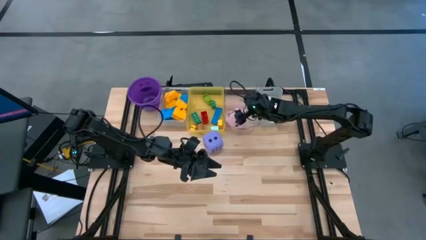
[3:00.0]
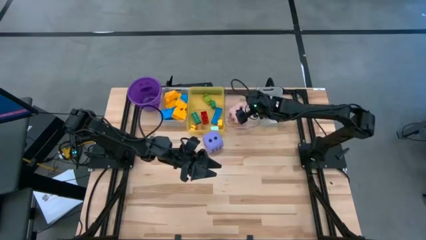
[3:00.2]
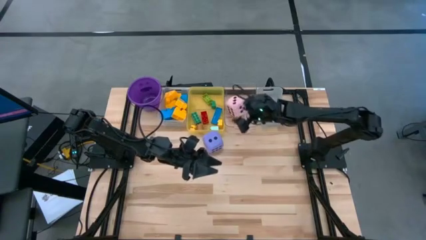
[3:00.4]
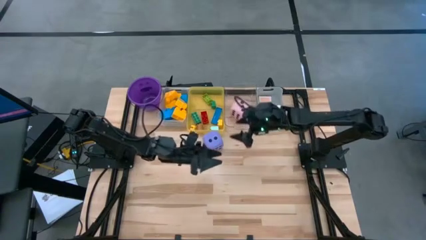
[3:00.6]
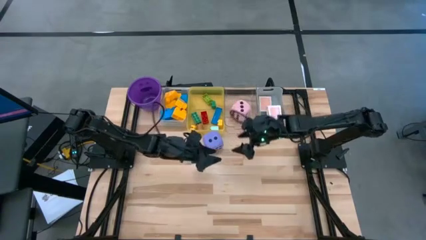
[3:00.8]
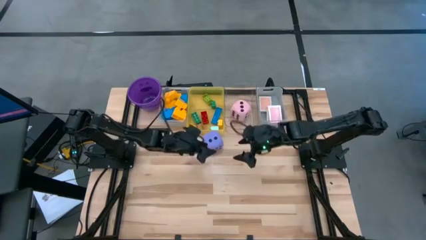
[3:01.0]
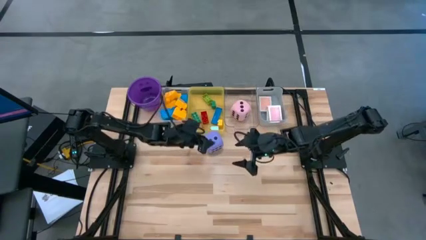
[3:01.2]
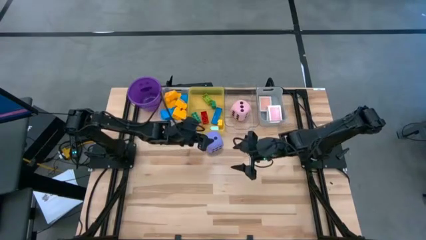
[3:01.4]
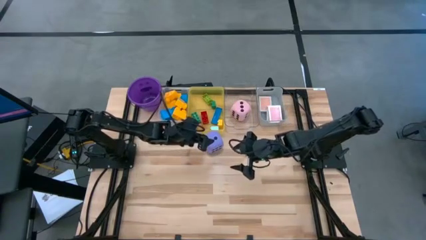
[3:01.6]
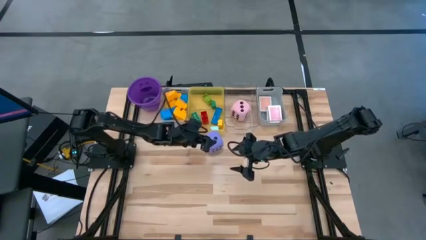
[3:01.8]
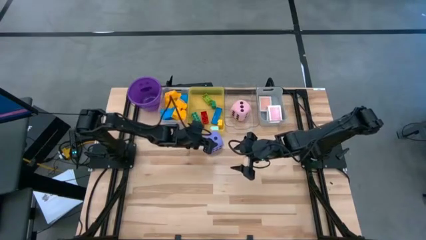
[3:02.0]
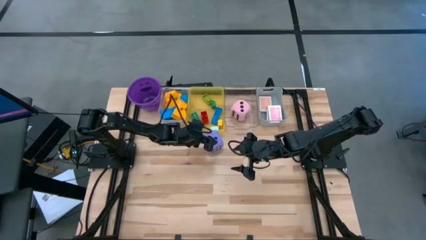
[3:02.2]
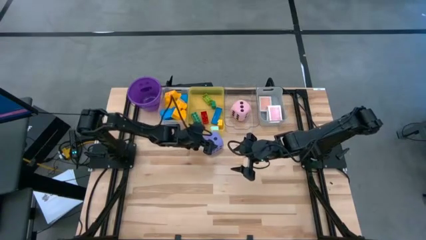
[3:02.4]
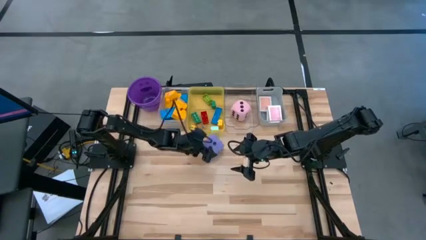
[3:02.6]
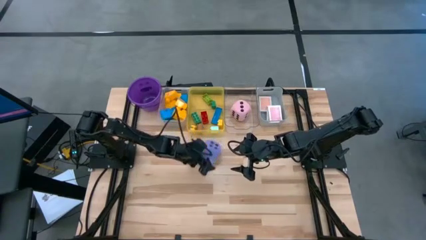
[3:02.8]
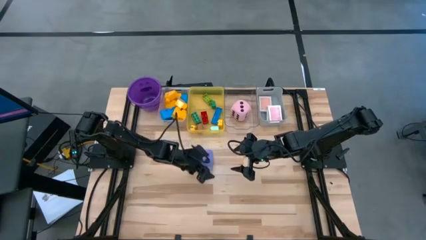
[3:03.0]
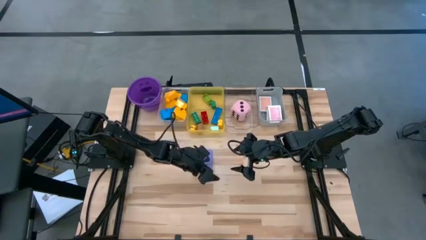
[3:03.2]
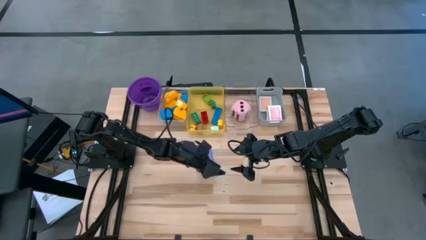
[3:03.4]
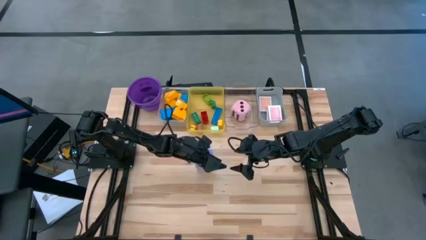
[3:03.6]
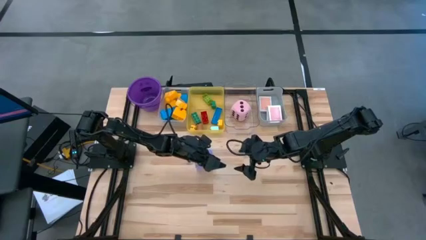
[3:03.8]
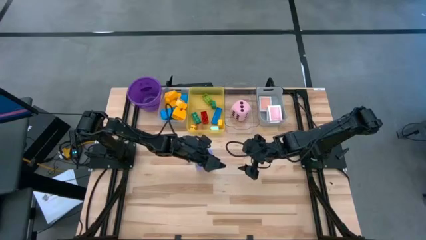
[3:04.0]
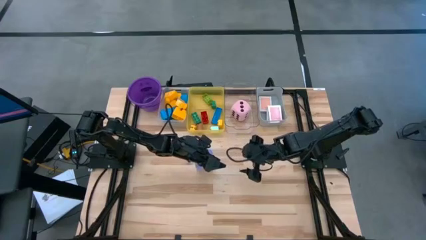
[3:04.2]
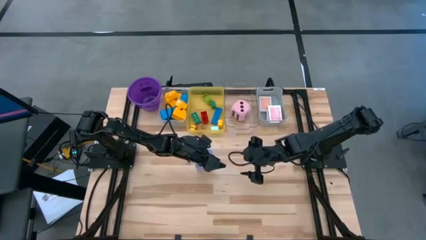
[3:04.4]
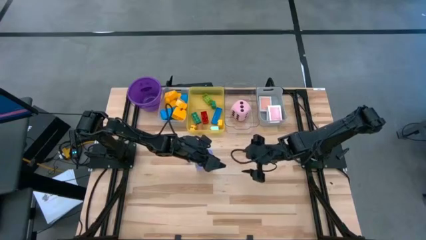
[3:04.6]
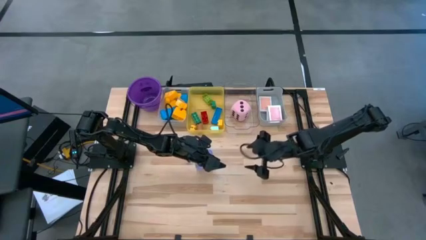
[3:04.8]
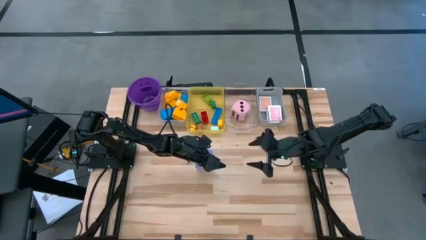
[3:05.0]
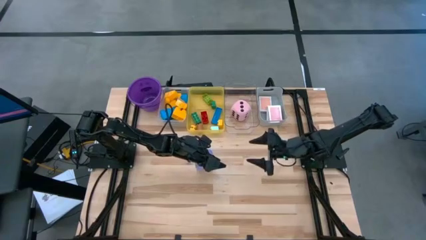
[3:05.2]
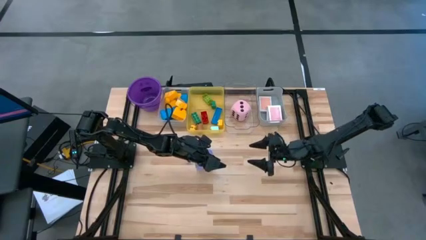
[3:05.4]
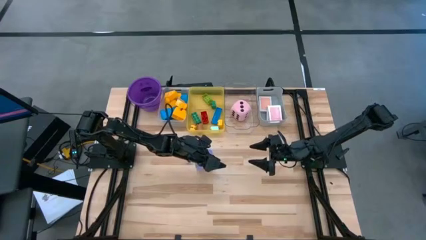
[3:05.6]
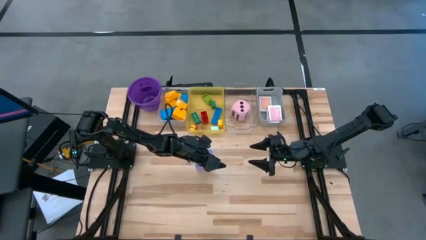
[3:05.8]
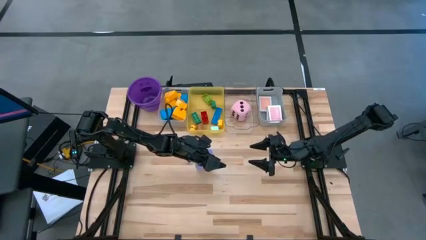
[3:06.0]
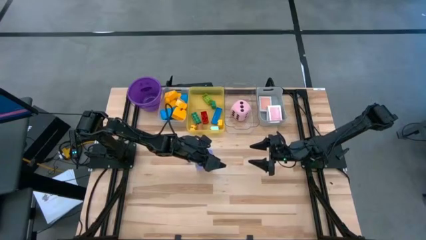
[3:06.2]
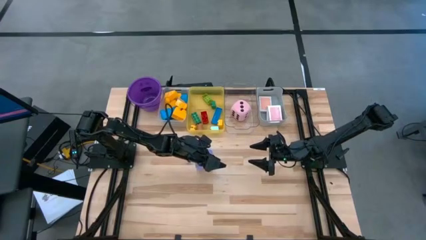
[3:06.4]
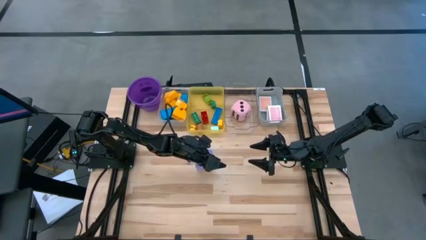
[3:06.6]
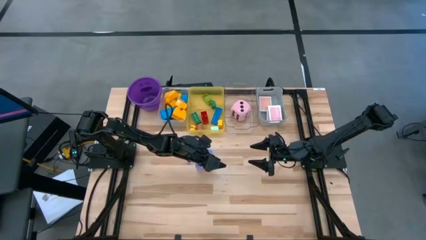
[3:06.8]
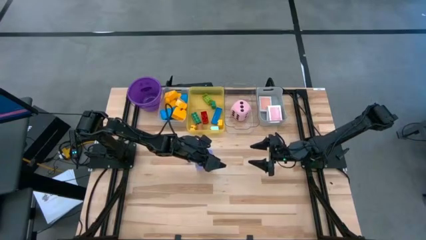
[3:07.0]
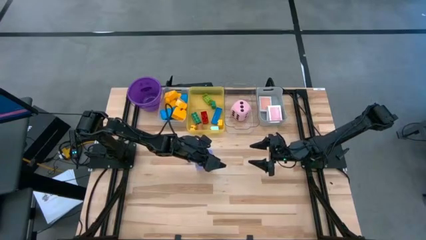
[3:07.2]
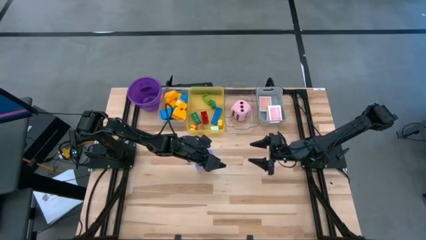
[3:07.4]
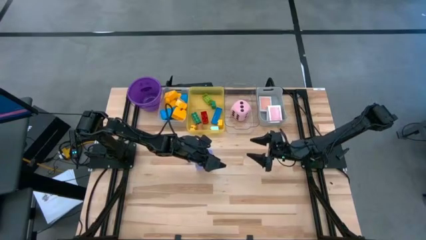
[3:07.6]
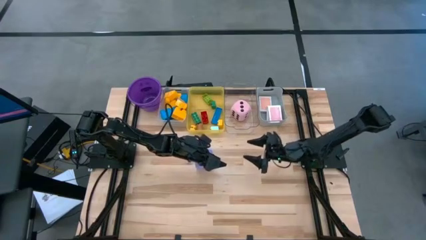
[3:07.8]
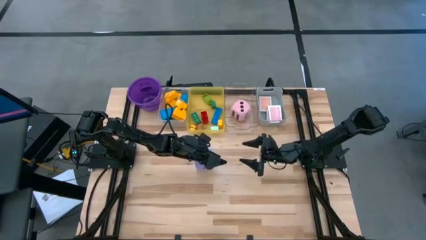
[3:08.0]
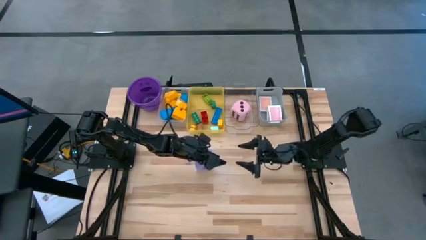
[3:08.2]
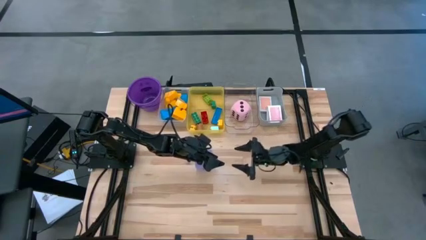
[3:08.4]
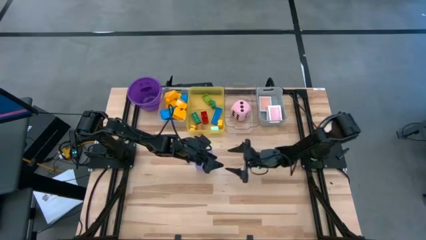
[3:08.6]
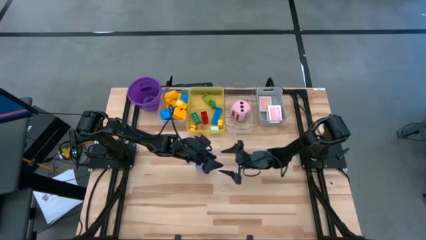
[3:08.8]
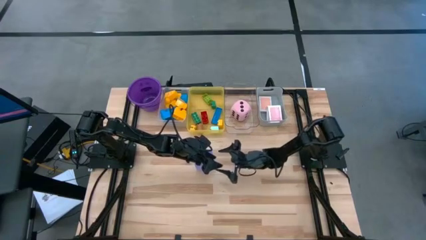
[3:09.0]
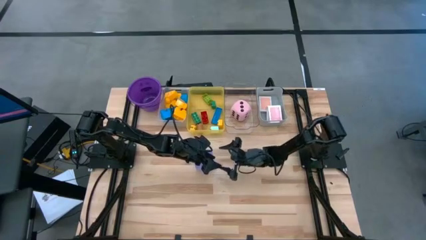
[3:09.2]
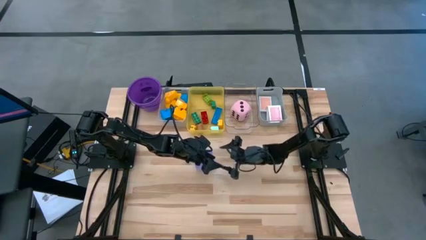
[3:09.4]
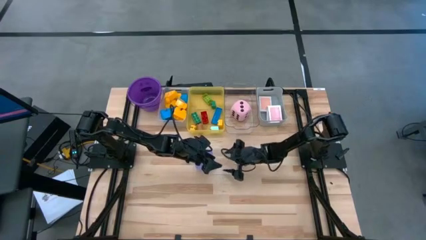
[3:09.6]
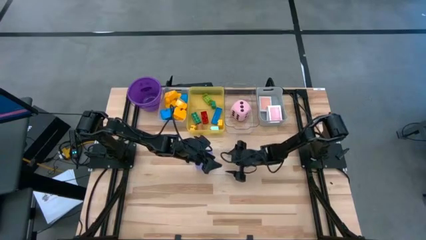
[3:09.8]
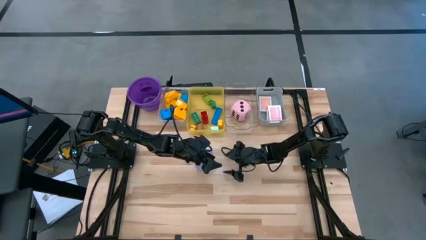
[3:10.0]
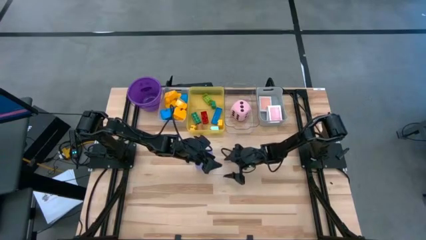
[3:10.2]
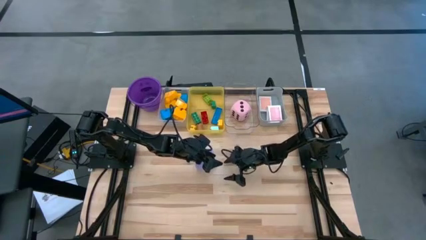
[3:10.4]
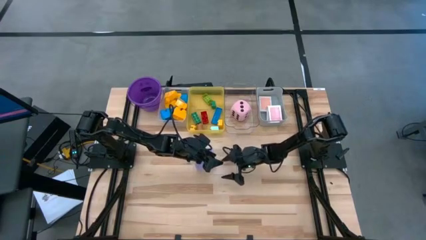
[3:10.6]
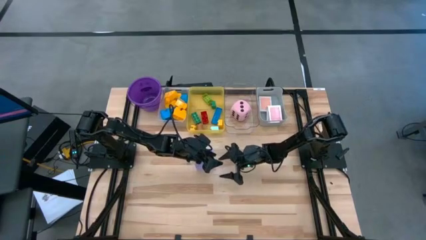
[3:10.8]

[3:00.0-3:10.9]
Task: Pick & Place Toys
Put the purple dice into the right transparent bin

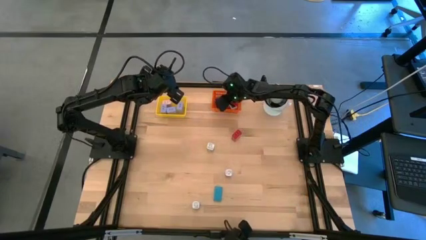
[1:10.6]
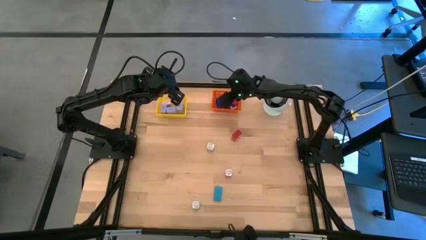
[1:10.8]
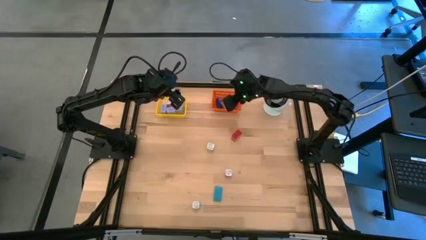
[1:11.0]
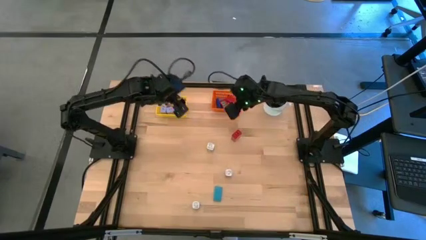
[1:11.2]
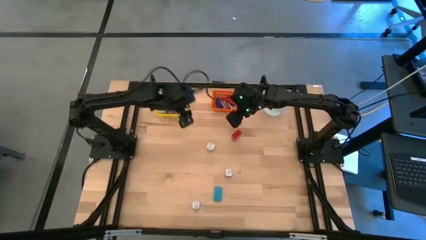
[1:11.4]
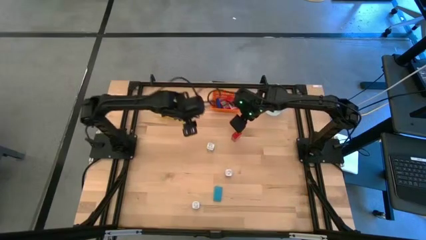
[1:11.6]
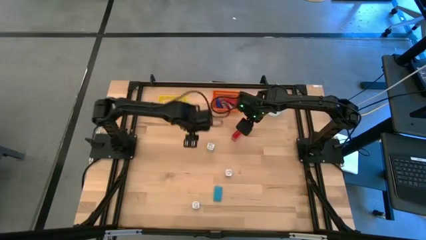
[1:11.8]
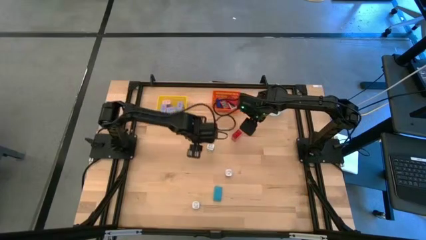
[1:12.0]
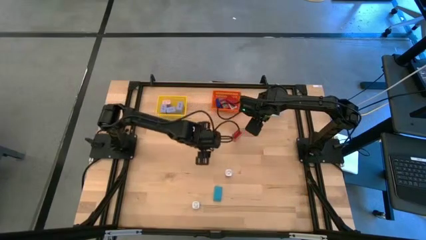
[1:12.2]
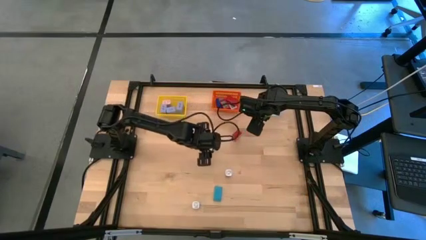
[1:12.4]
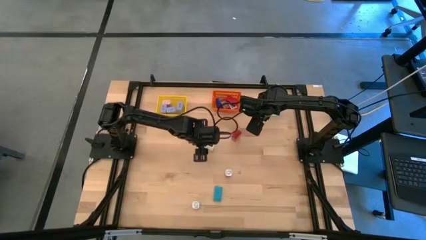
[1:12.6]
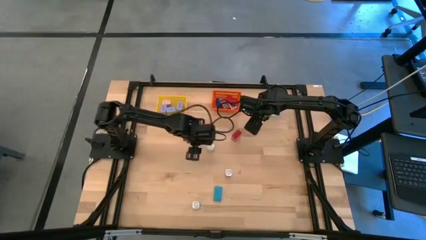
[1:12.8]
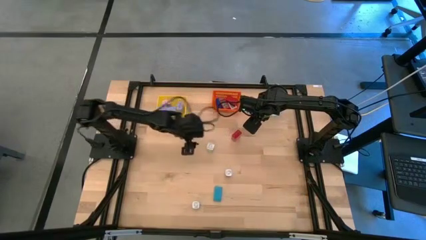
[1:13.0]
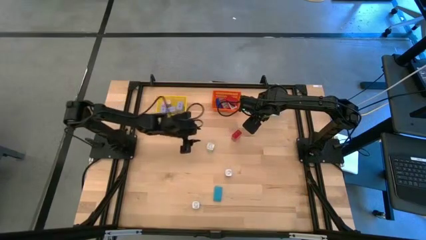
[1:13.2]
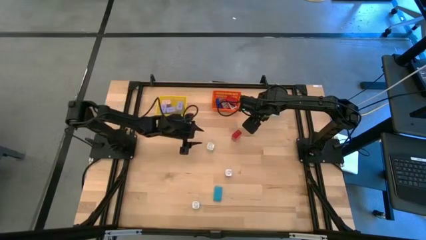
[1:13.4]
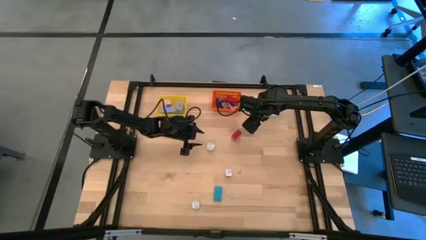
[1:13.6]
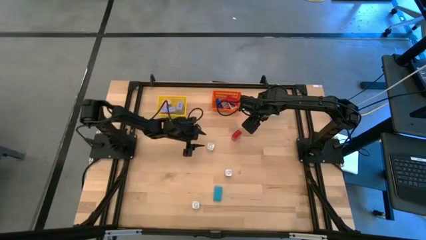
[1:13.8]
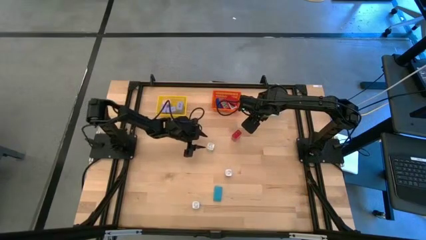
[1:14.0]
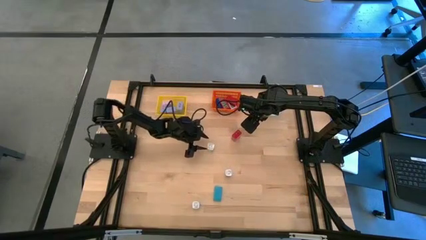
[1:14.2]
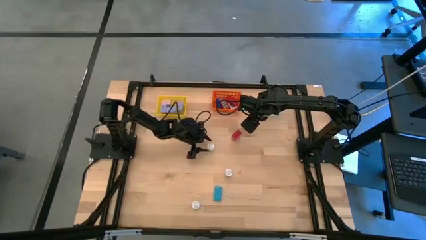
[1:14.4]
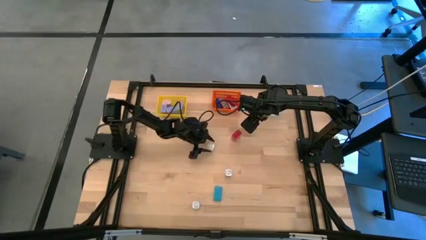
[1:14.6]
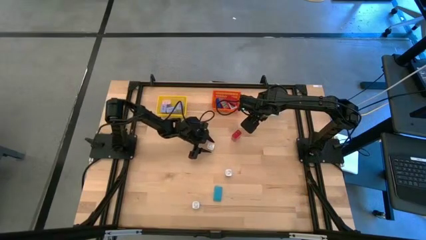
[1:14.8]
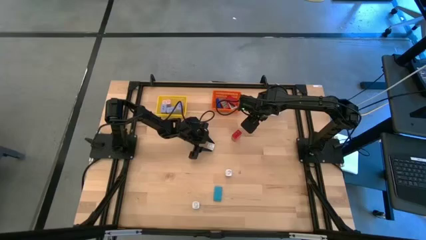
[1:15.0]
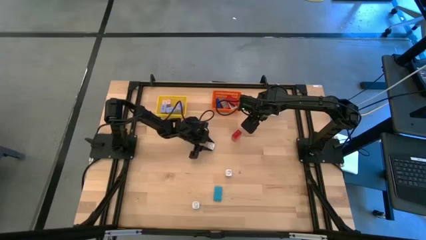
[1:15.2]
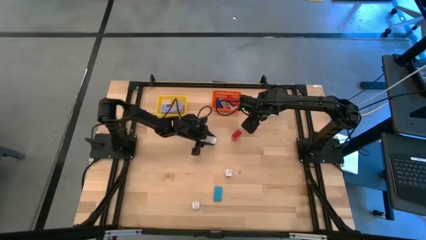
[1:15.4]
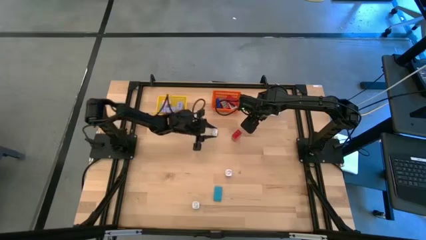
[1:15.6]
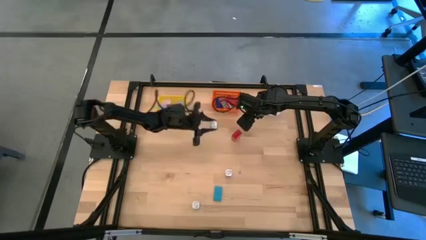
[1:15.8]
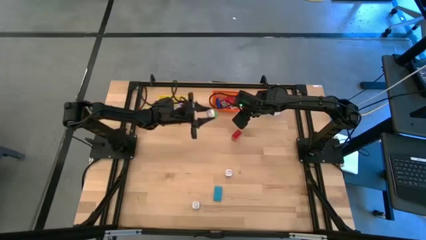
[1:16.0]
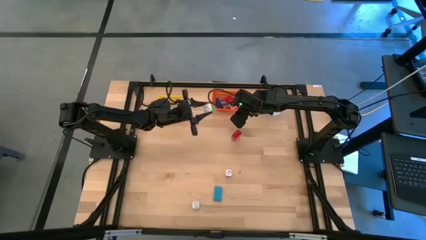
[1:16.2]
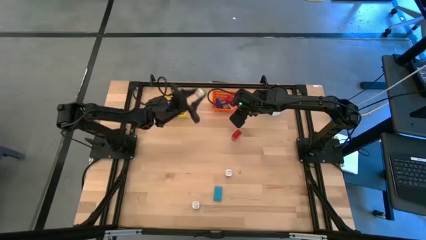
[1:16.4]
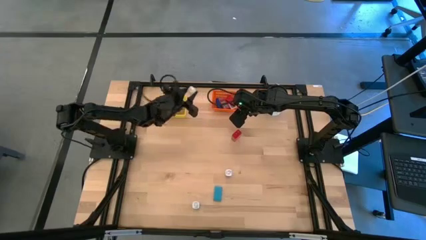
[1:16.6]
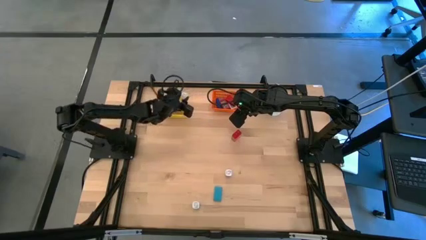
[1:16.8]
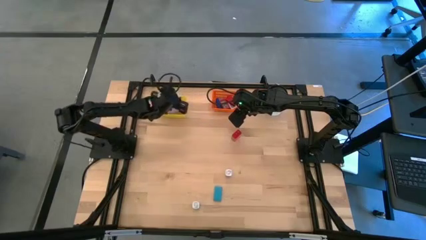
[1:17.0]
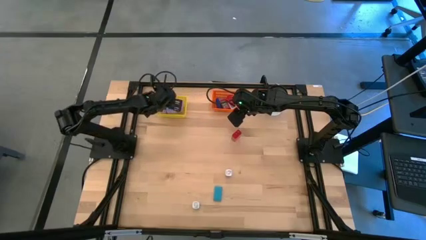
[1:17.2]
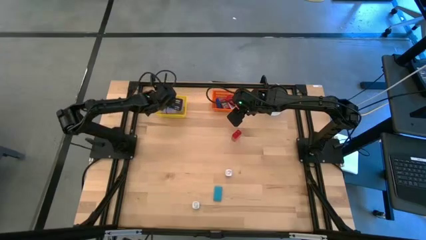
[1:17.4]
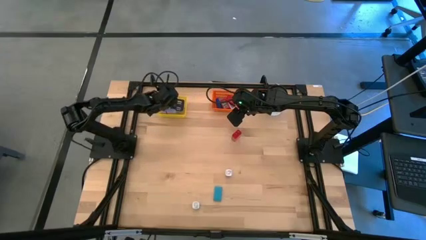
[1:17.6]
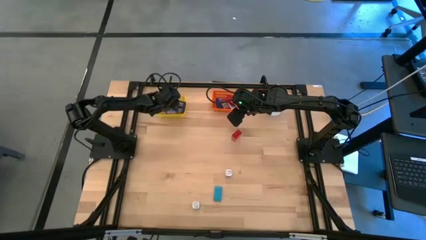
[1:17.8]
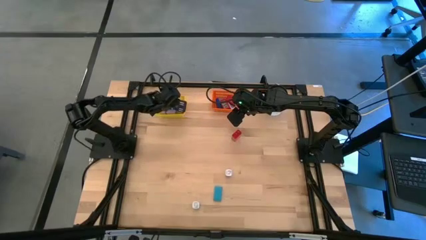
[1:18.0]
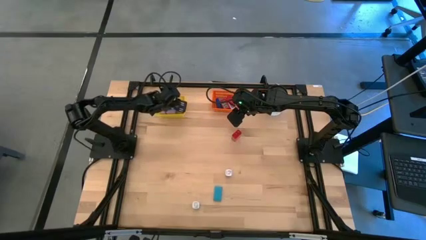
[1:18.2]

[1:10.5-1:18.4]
Task: Pick & Place Office items
Put the top green changer adapter into the yellow bin
